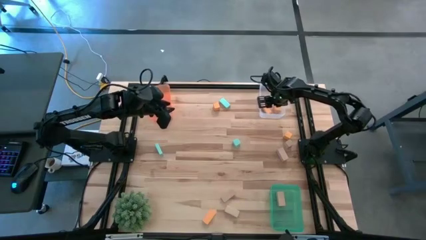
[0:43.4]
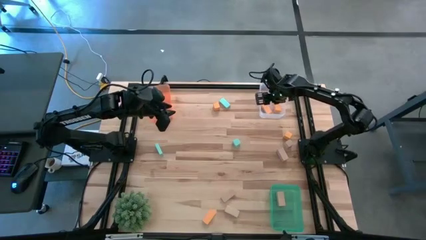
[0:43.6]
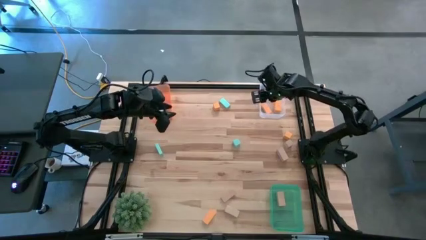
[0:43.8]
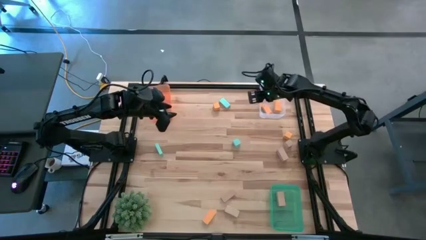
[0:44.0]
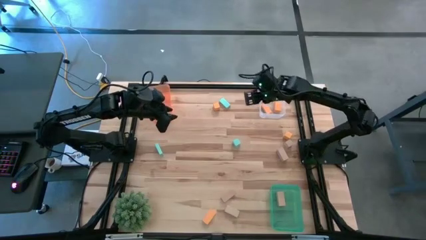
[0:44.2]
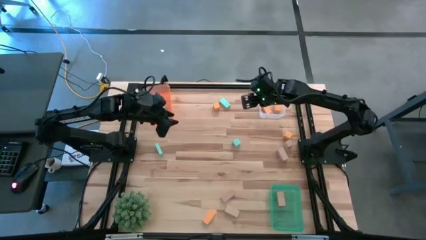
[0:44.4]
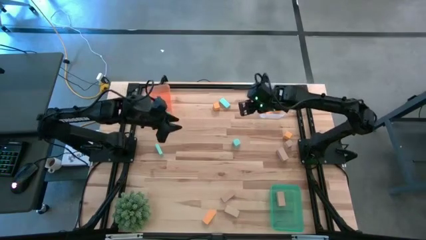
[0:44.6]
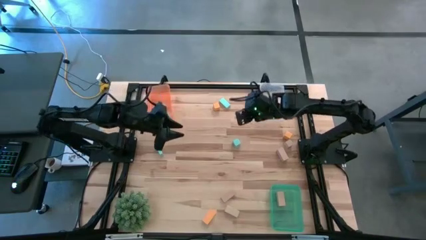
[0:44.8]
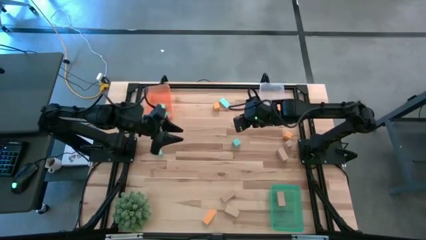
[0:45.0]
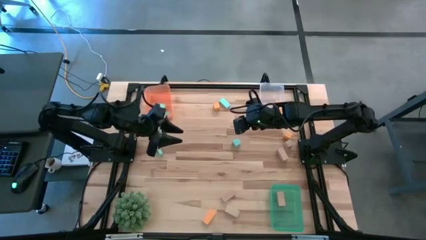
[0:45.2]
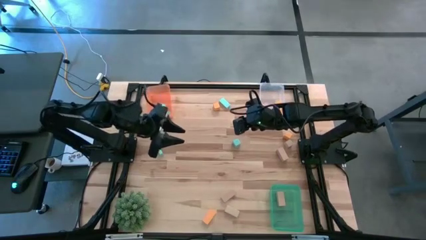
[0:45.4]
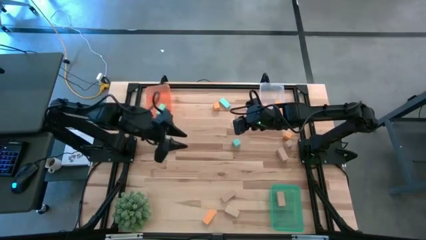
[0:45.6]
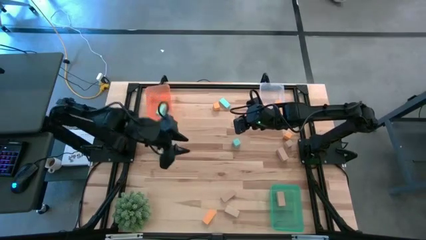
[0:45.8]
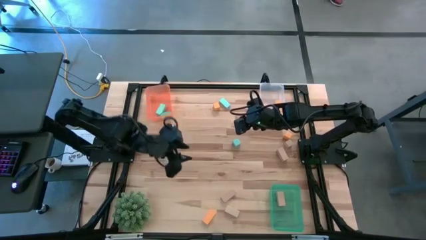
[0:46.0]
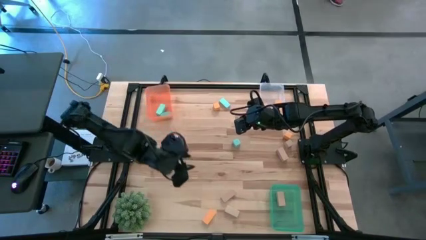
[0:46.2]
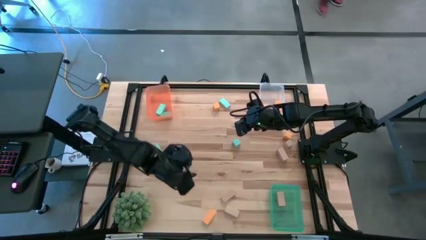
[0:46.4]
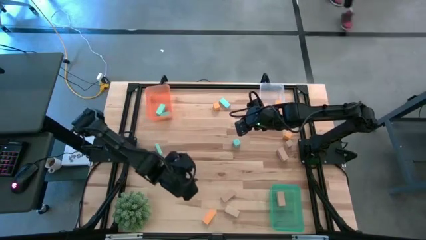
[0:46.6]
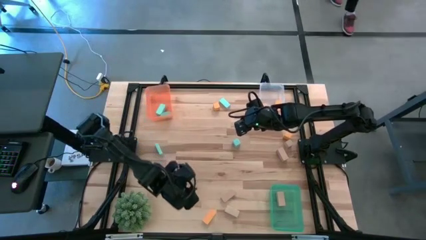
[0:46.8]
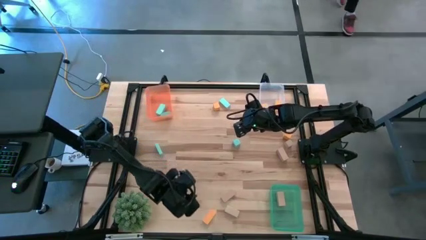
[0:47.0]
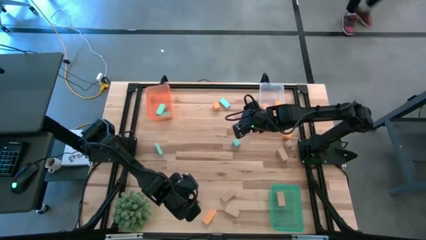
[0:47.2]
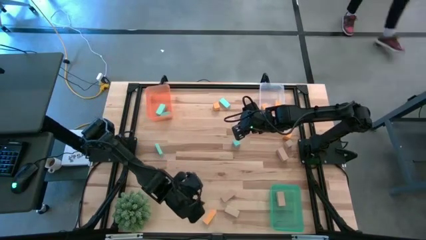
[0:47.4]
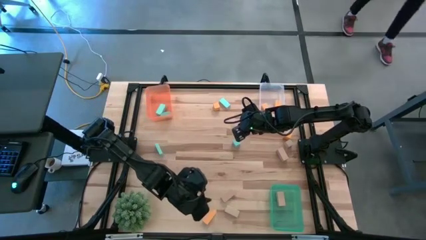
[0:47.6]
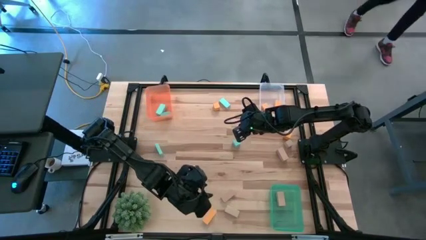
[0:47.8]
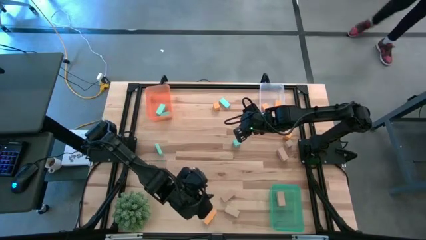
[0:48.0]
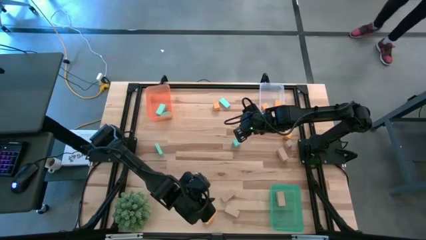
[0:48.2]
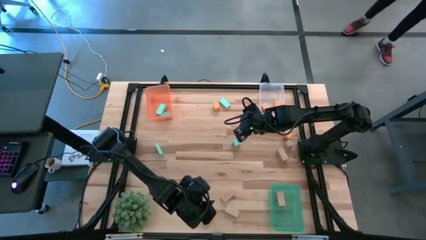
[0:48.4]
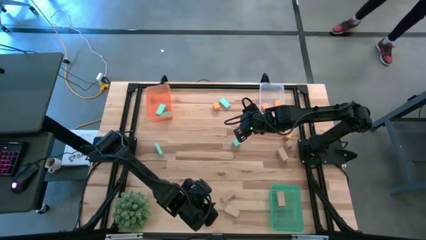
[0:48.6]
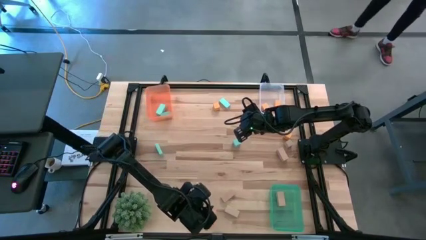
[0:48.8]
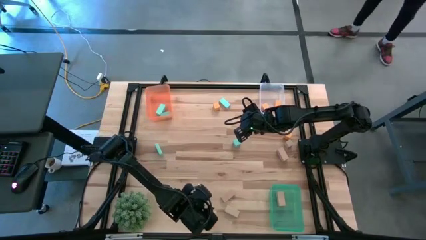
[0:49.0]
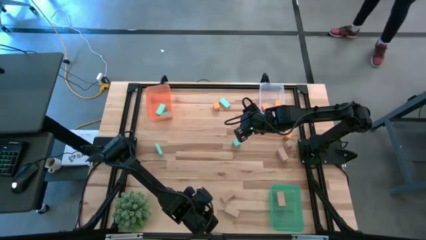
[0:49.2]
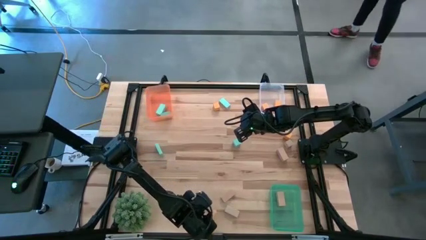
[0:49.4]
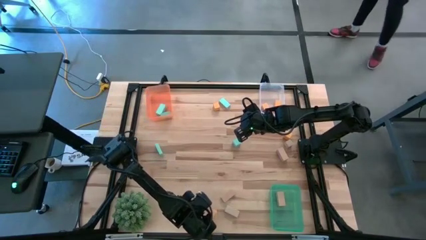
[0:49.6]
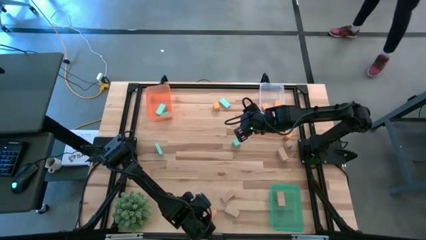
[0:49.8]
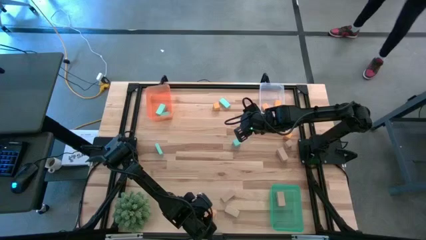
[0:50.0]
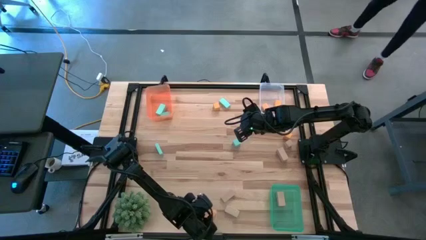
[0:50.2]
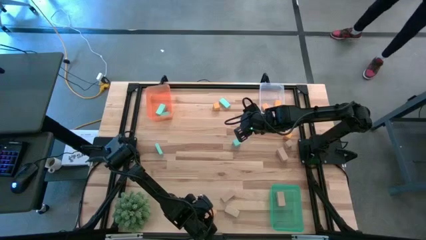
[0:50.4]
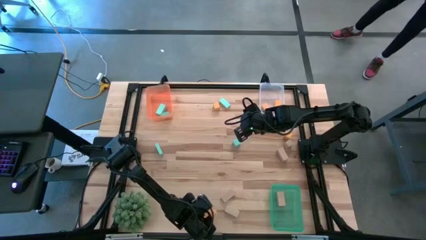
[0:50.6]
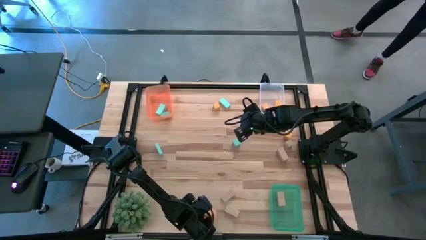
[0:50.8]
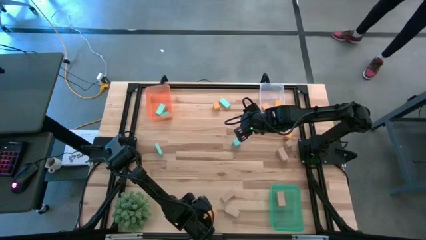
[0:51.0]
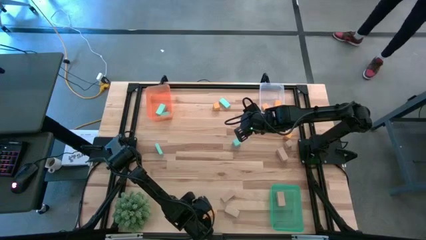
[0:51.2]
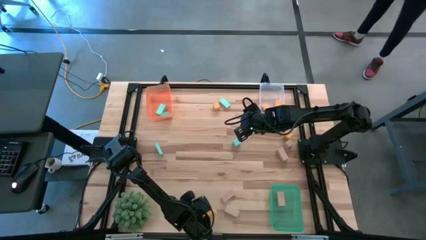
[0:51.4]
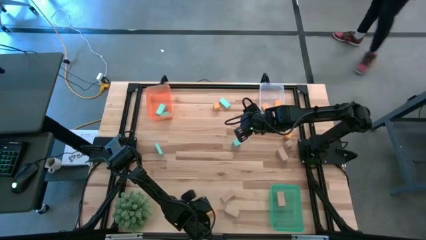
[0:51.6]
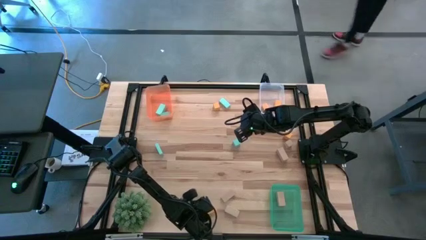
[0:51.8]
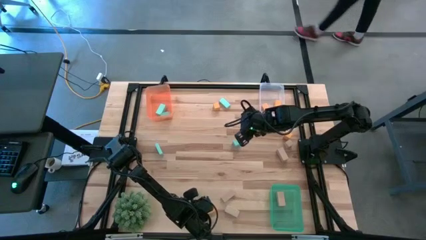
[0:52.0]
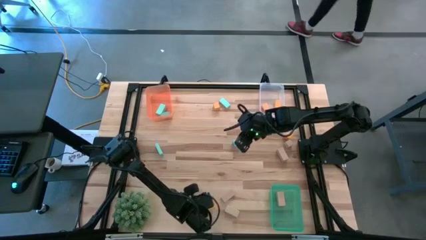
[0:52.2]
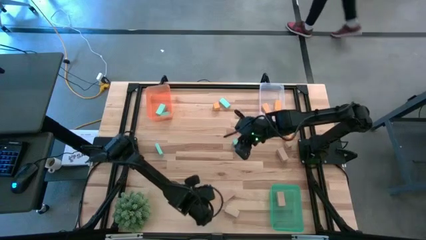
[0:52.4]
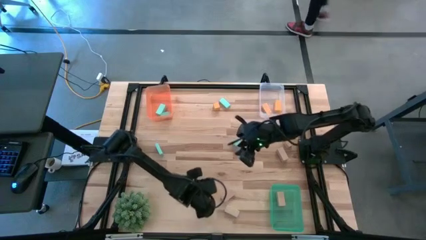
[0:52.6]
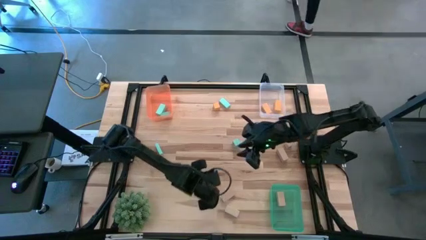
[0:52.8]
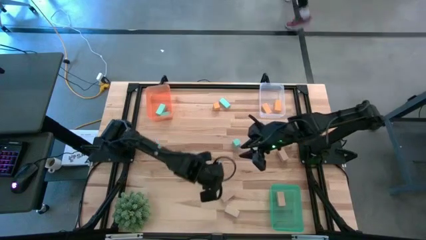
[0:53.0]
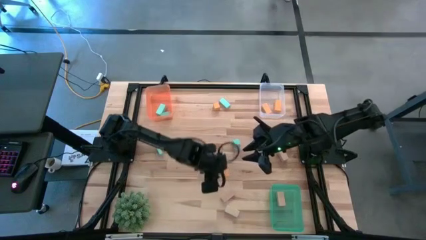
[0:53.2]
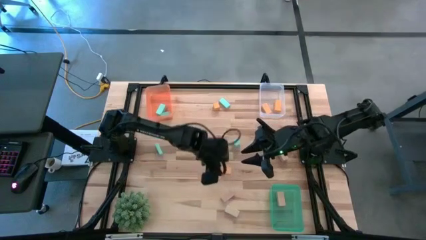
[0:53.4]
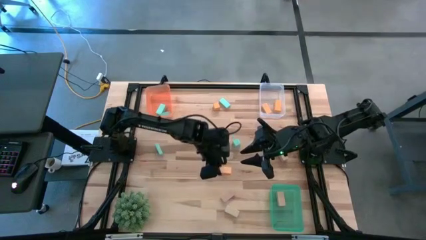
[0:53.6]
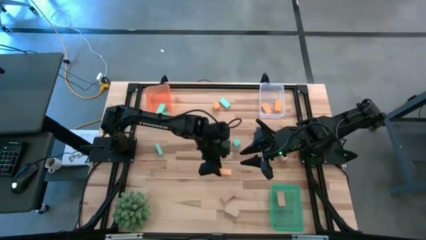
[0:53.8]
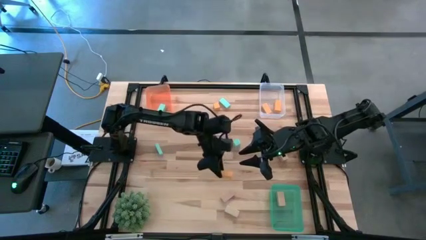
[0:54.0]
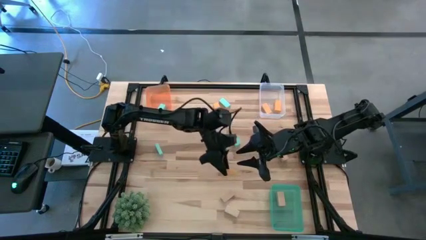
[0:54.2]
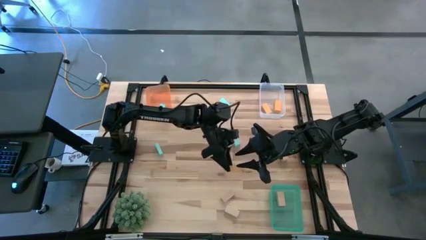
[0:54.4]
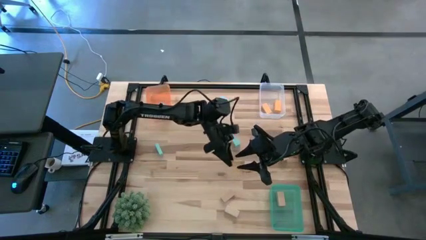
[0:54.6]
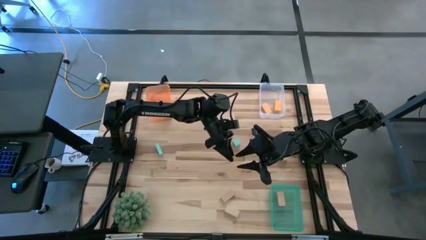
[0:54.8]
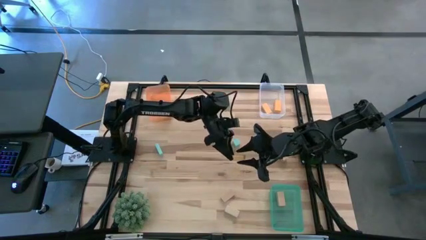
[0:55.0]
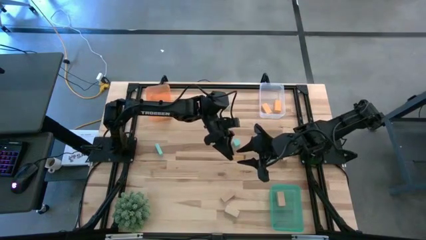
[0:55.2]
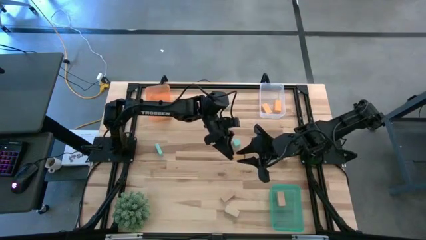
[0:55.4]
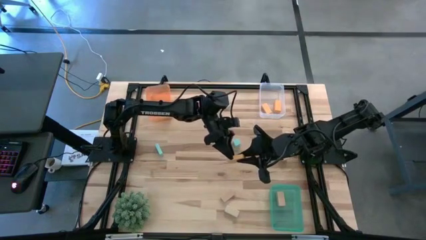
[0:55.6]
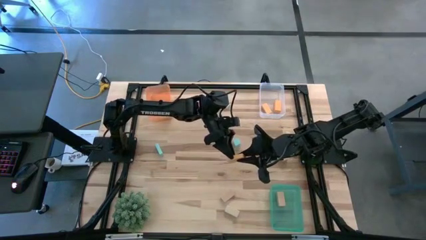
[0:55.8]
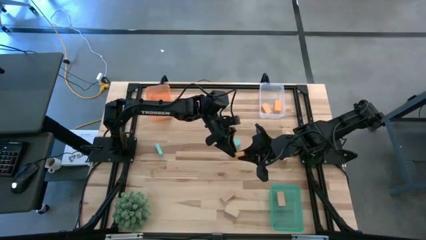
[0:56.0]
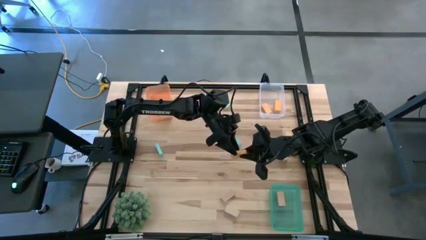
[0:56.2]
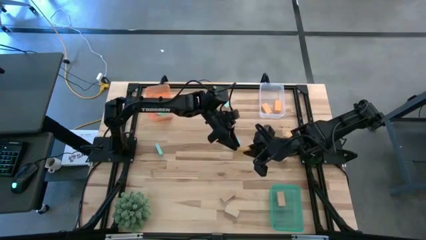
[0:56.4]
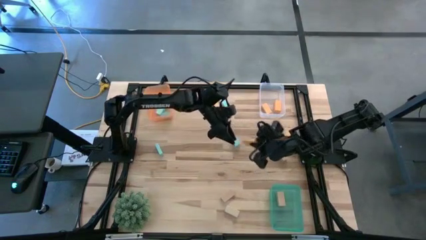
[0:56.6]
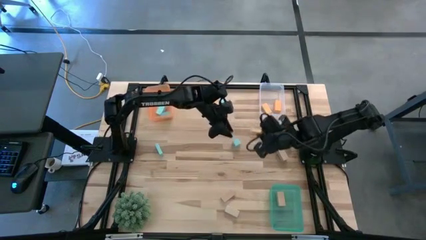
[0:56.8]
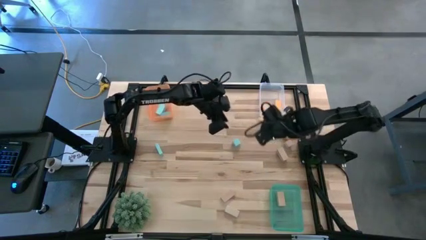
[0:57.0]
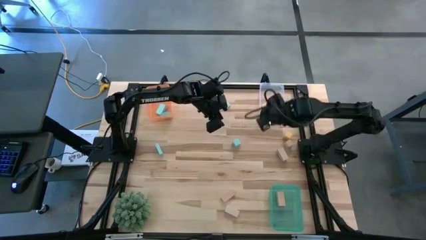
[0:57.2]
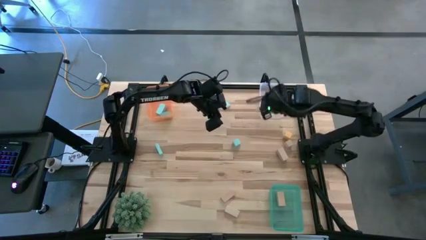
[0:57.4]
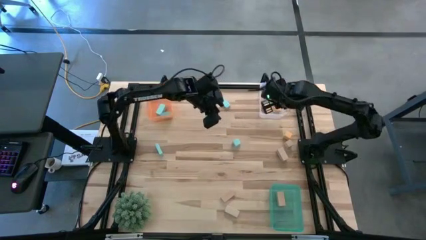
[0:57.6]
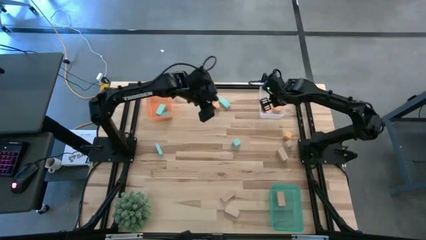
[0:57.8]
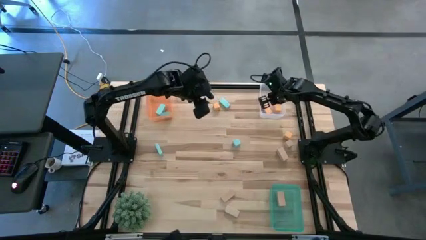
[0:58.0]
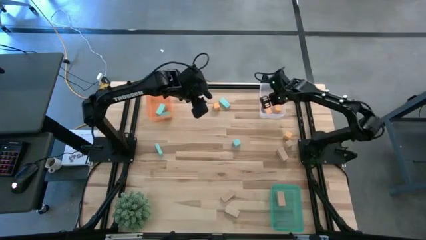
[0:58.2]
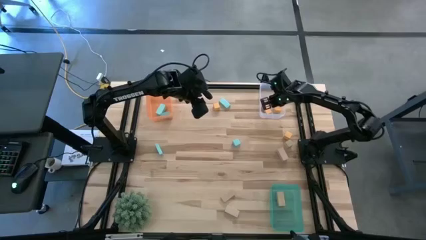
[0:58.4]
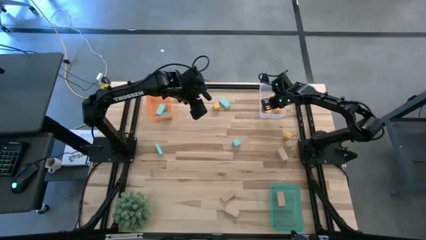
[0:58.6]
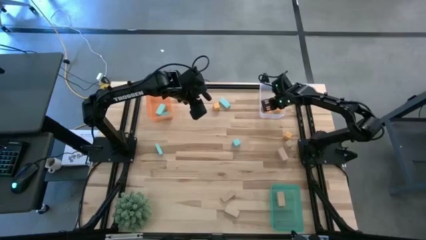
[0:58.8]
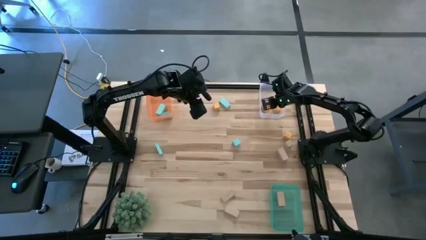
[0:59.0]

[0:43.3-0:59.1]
Task: Sort & place blocks by color
Put the orange block into the transparent bin
